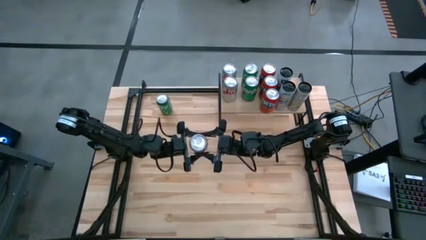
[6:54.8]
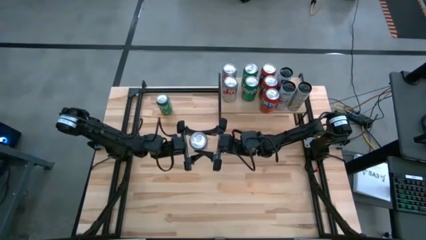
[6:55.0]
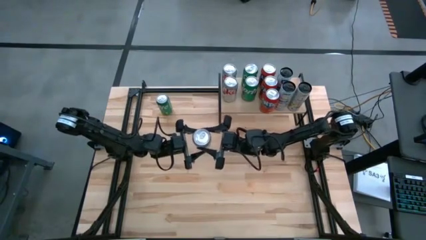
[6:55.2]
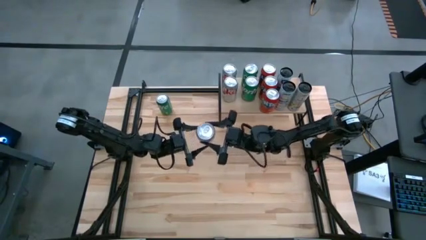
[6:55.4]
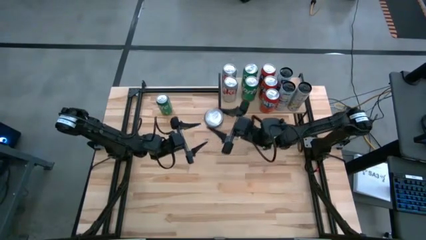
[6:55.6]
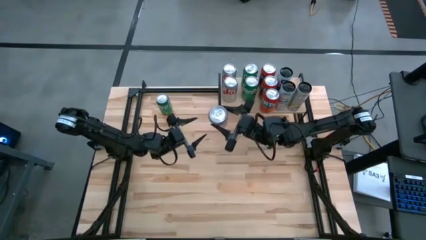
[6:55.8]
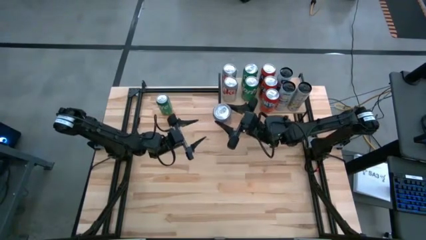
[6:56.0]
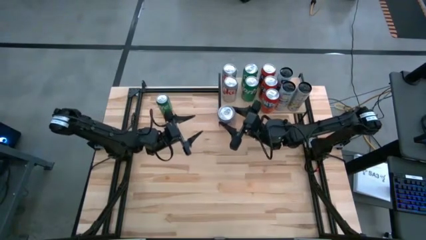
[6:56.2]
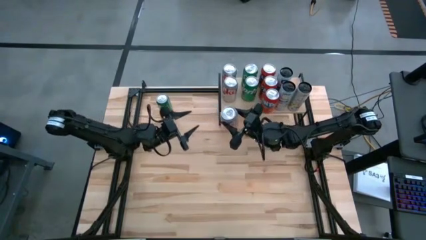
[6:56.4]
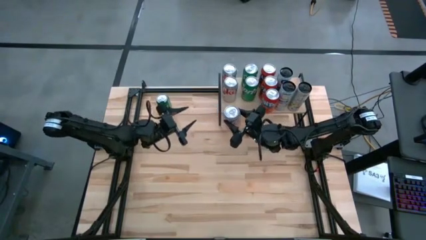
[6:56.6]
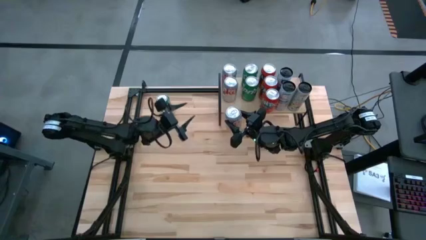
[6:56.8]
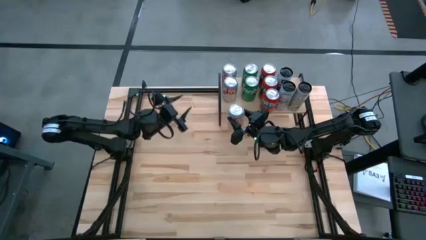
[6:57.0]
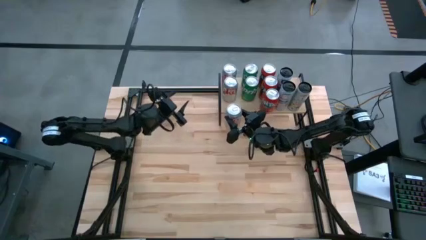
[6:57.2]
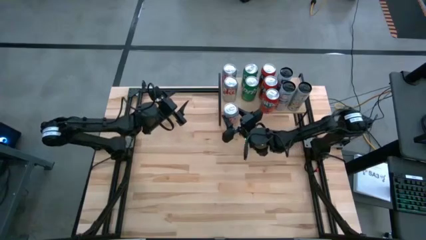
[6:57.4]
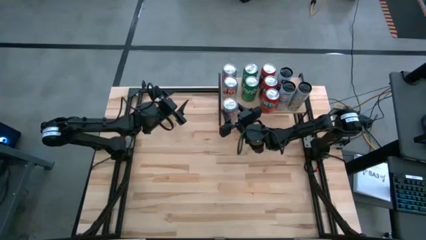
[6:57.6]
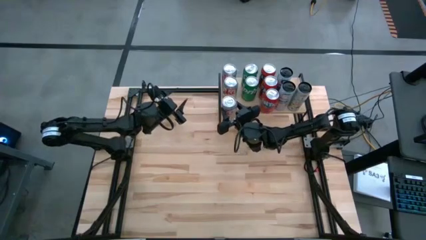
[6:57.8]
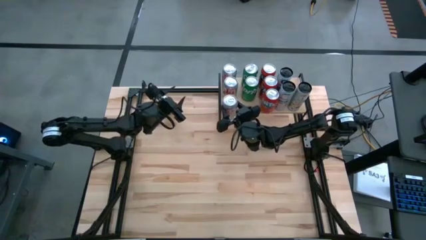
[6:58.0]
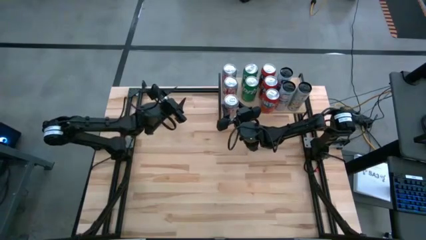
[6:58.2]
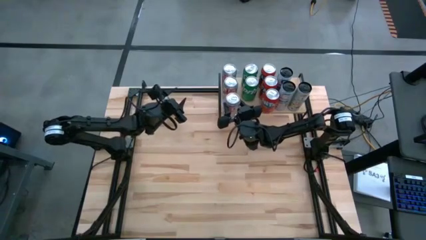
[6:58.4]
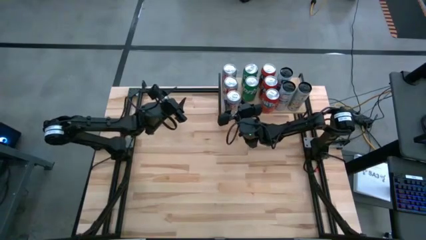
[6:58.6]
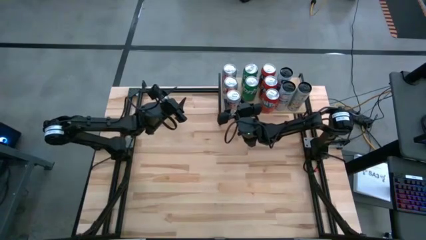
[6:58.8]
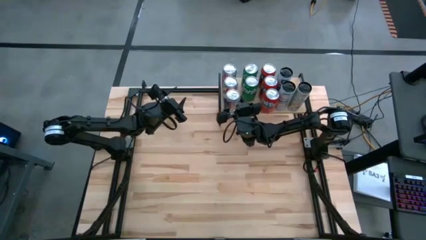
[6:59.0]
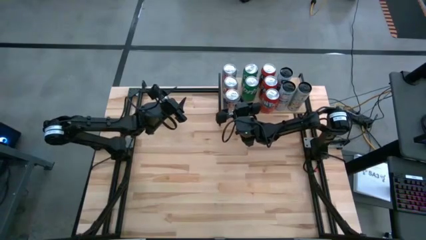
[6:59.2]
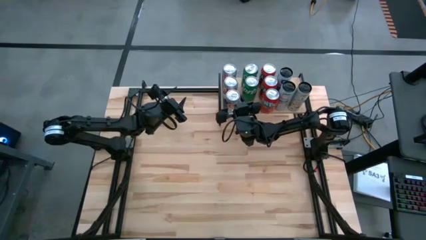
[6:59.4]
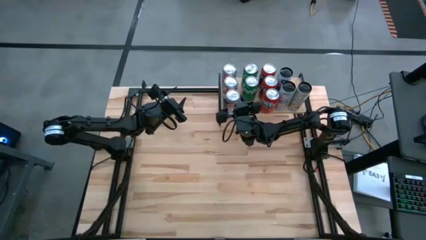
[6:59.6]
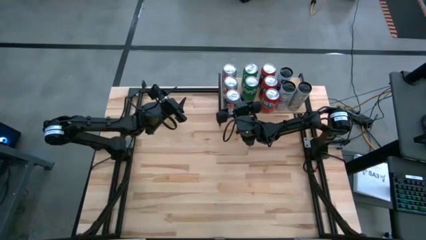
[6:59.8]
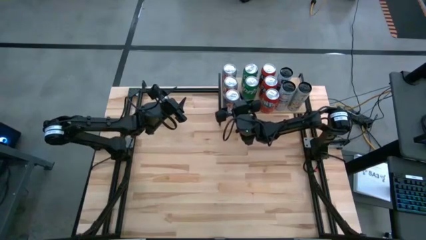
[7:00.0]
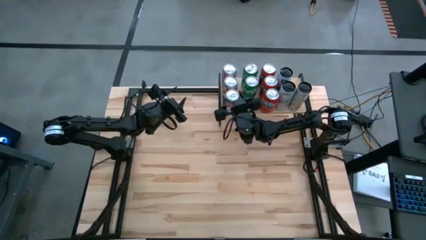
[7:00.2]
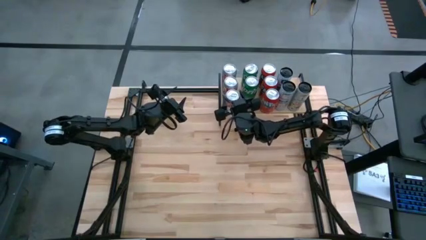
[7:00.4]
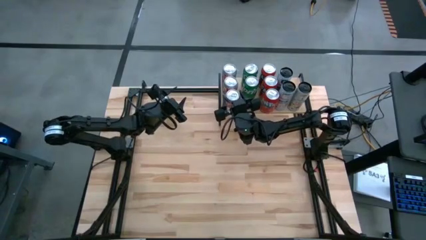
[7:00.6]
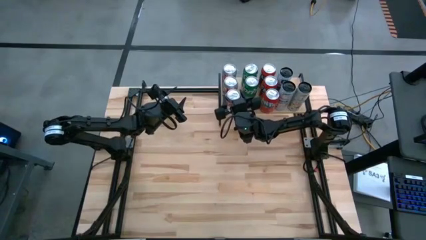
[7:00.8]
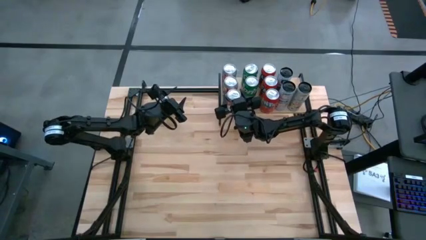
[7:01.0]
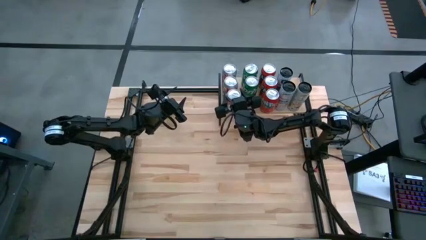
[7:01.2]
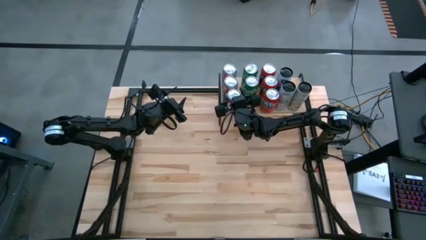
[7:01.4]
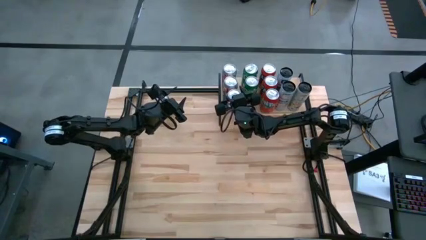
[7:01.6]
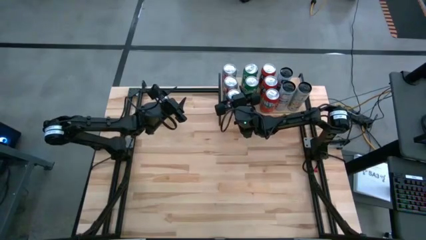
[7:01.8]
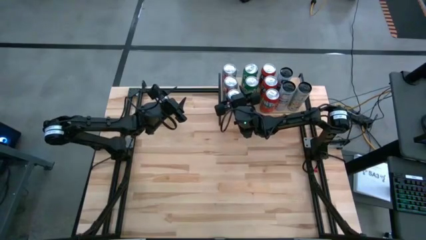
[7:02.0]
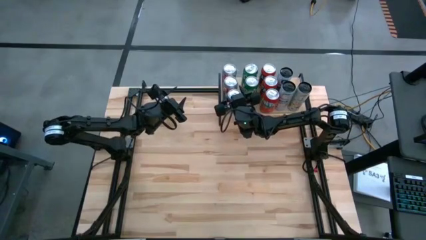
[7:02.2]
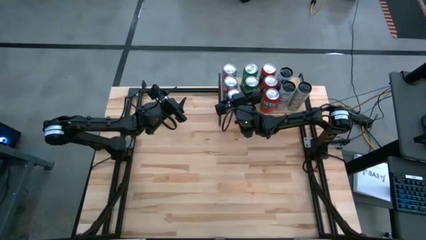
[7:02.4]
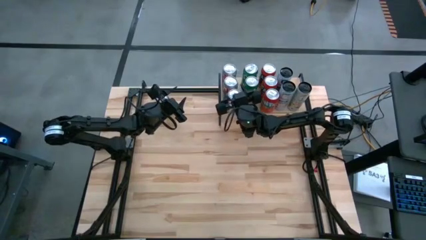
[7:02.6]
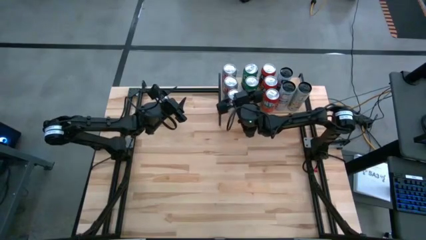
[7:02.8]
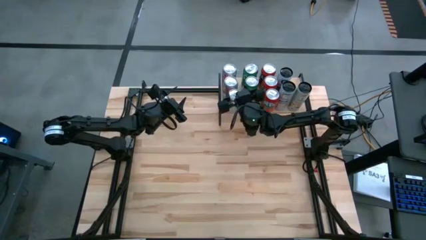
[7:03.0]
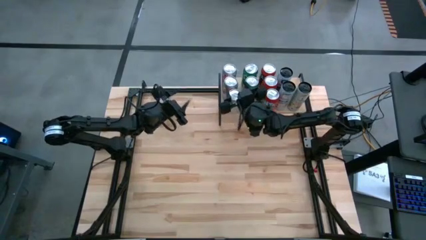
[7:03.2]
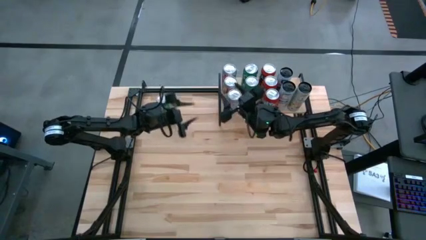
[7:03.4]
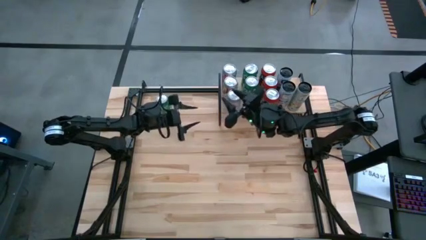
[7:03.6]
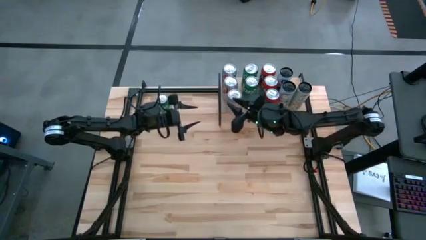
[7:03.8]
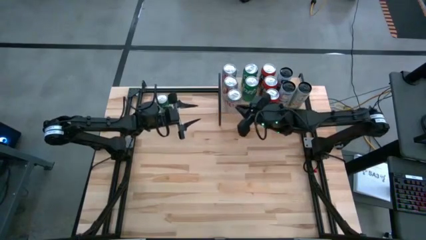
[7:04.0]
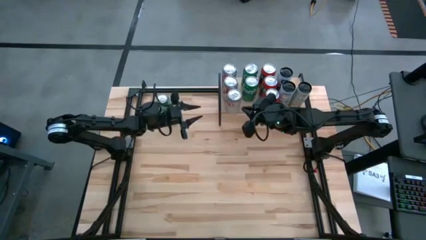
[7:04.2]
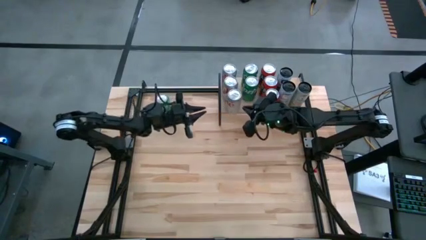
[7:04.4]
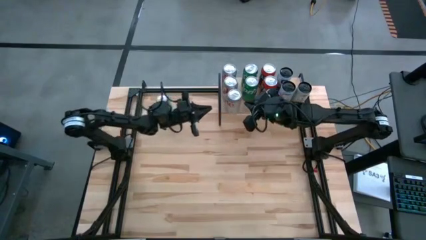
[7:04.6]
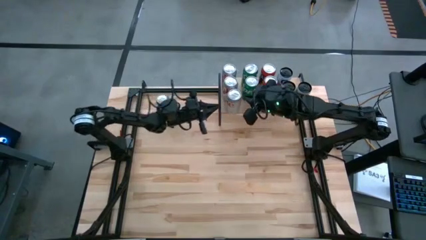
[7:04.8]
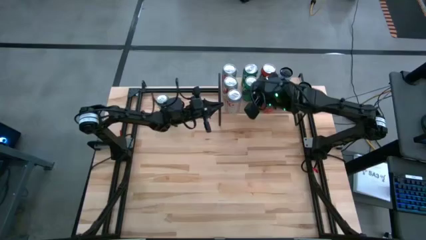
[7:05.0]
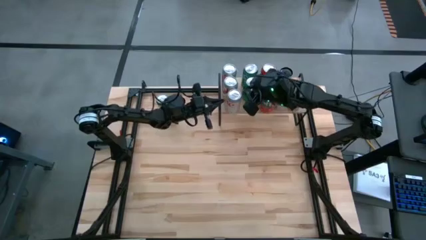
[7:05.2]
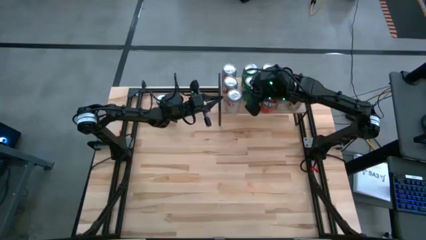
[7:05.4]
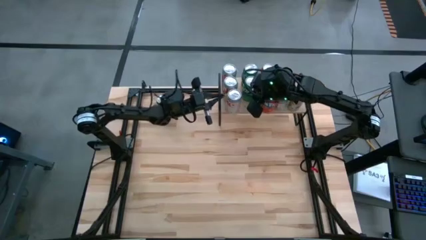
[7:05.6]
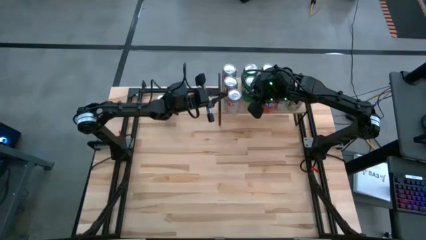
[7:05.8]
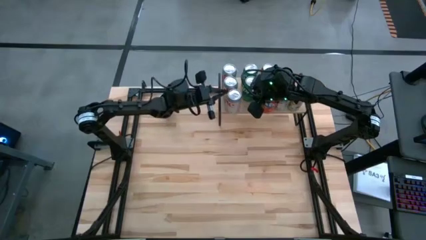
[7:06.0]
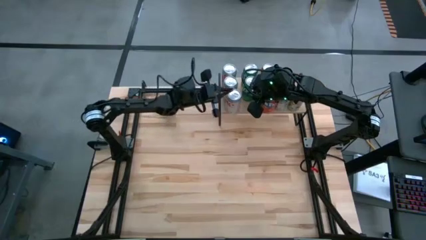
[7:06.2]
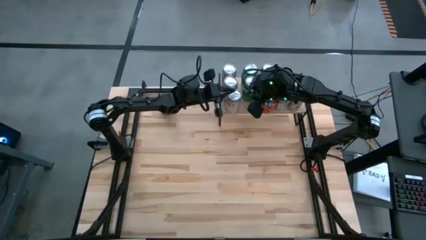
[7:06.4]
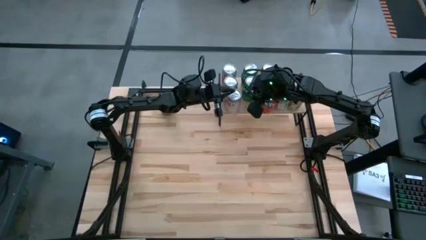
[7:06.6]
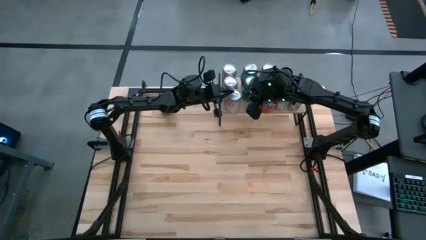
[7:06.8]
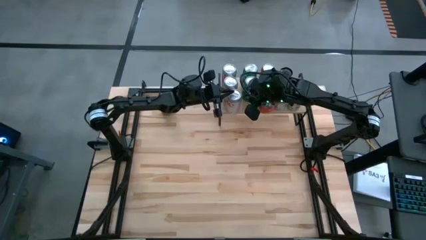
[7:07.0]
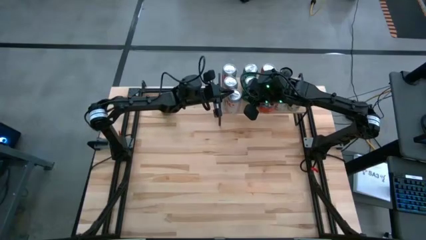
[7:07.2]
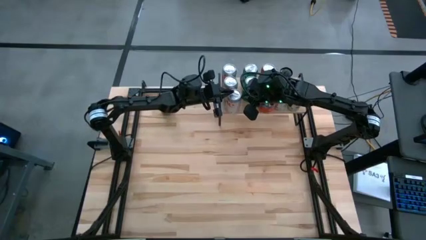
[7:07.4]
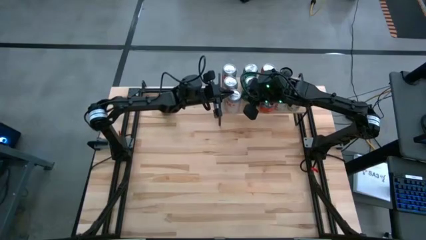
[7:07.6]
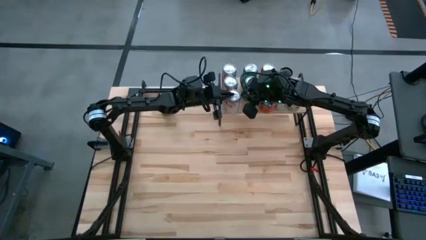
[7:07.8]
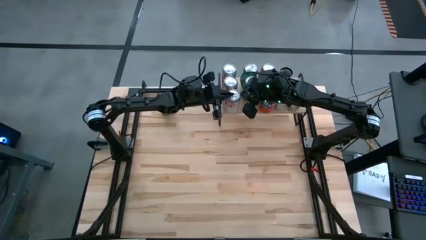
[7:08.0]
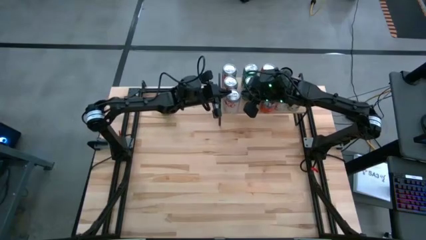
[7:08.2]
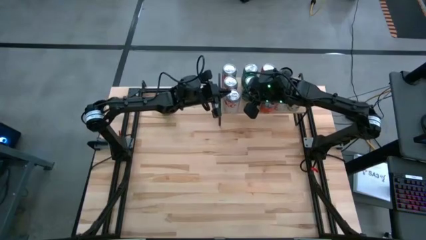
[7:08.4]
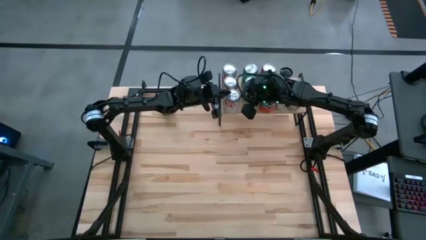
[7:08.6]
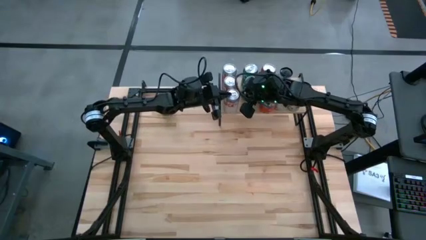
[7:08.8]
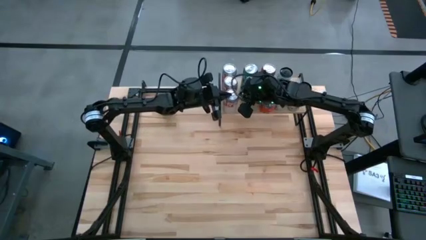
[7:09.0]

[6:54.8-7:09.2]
Task: Place canned beverage on shelf
Put the silver soda can on the shelf aligned in front of the other silver soda can
